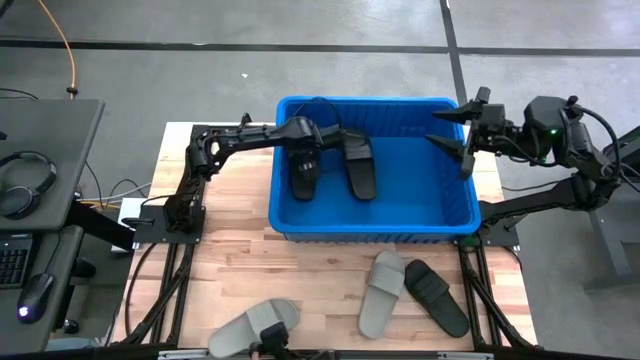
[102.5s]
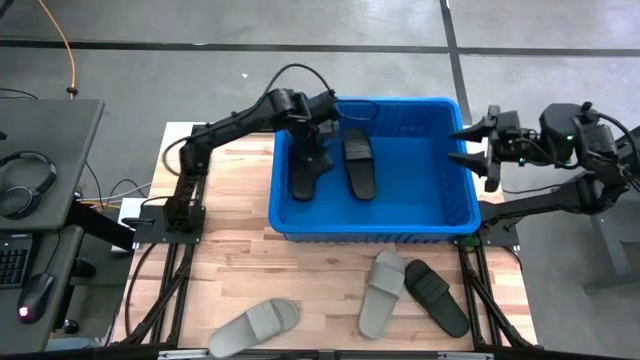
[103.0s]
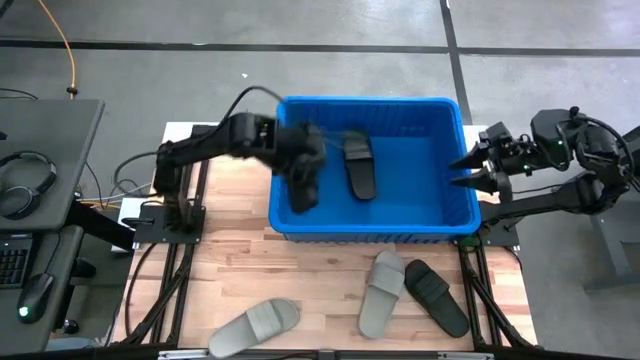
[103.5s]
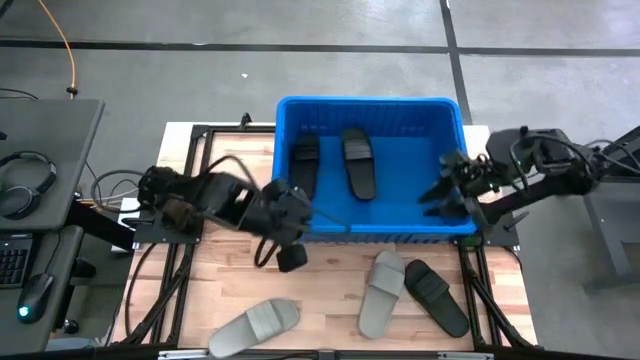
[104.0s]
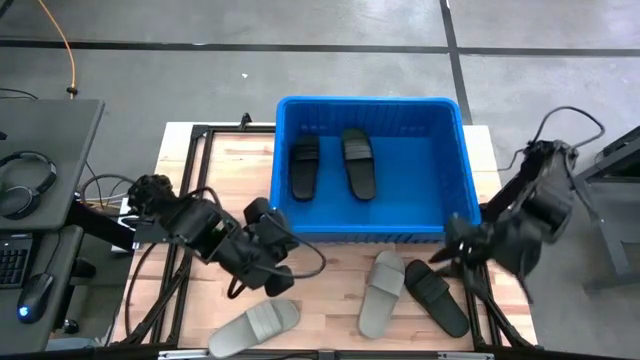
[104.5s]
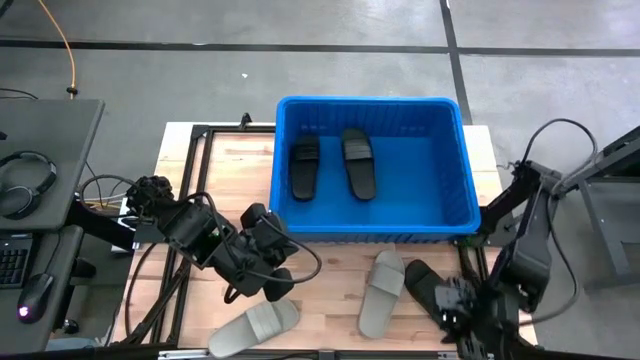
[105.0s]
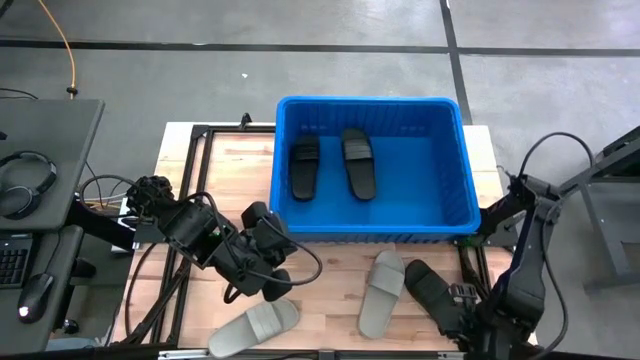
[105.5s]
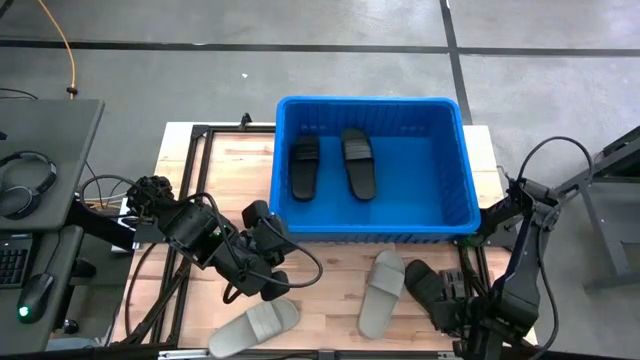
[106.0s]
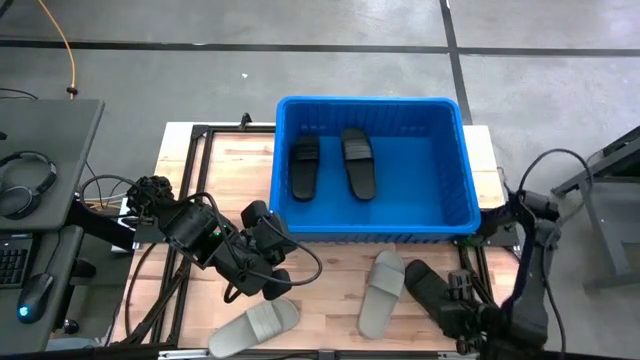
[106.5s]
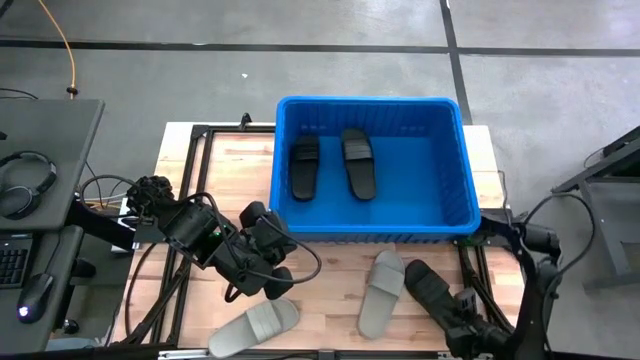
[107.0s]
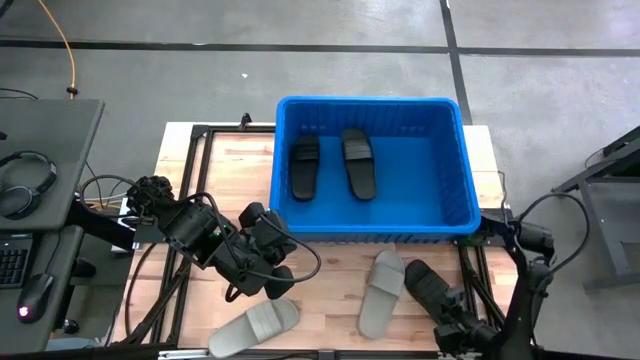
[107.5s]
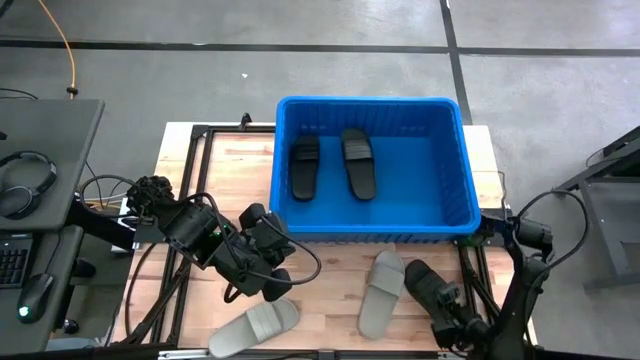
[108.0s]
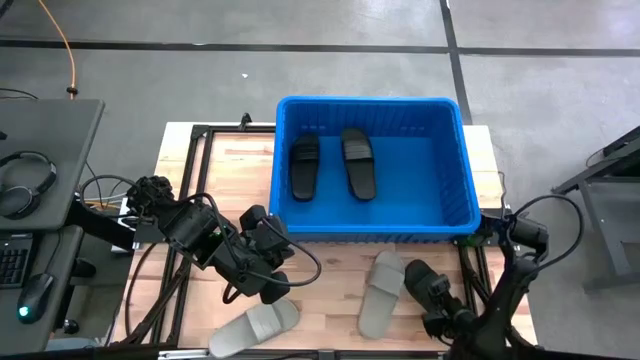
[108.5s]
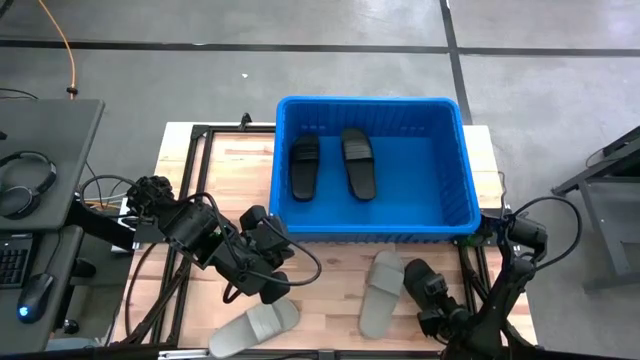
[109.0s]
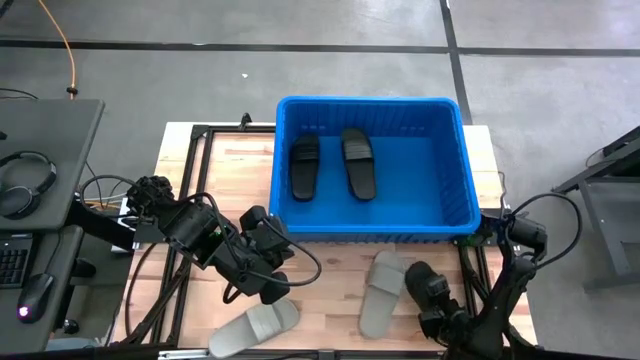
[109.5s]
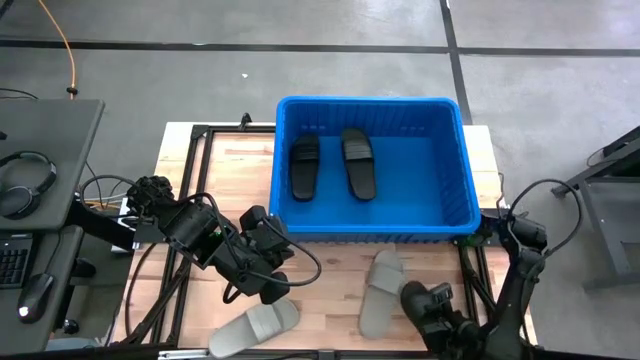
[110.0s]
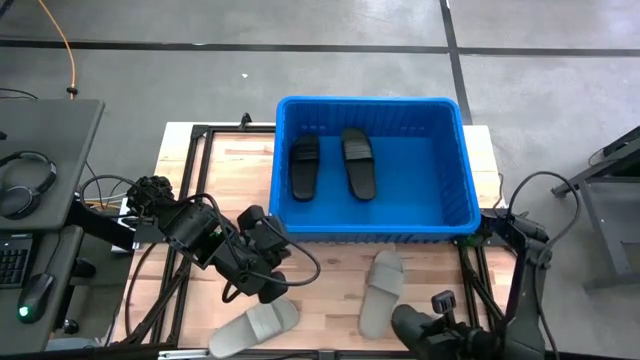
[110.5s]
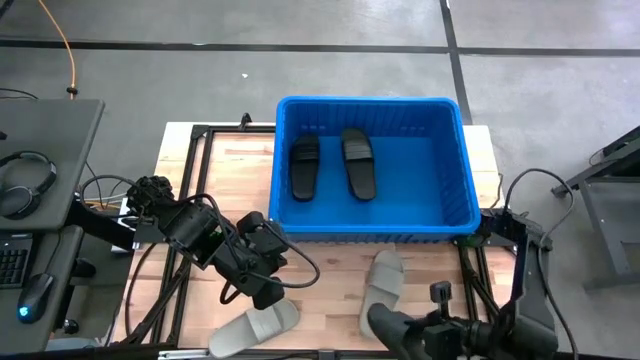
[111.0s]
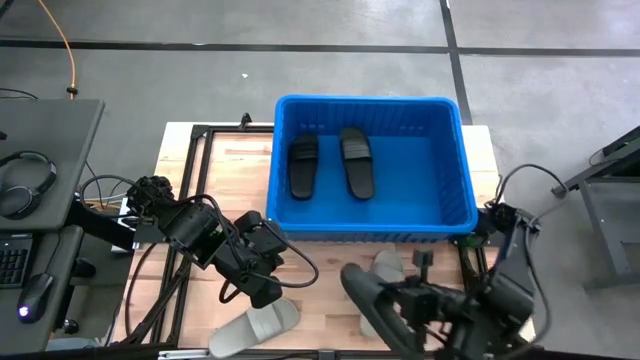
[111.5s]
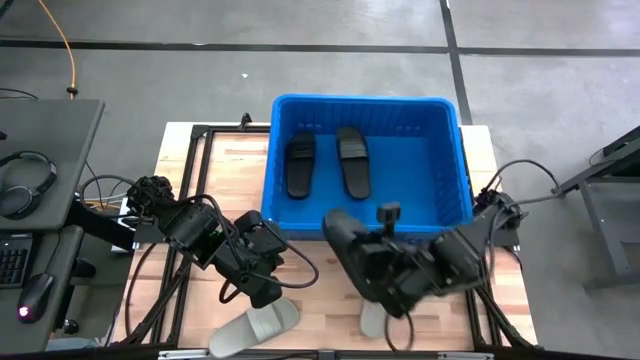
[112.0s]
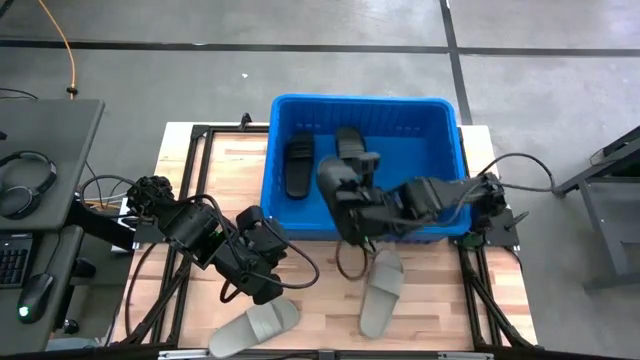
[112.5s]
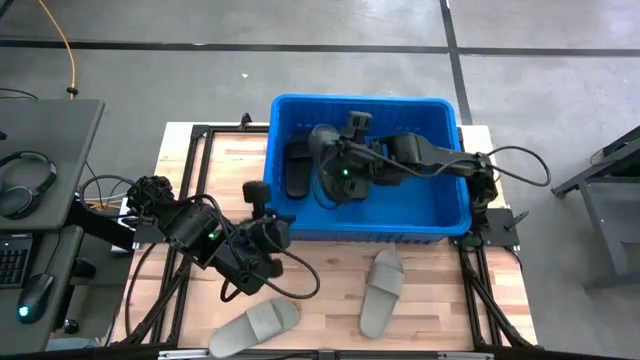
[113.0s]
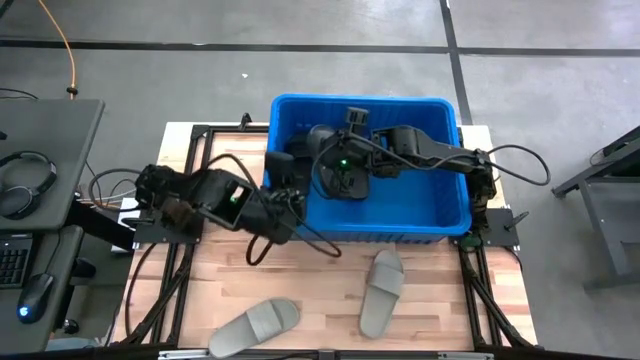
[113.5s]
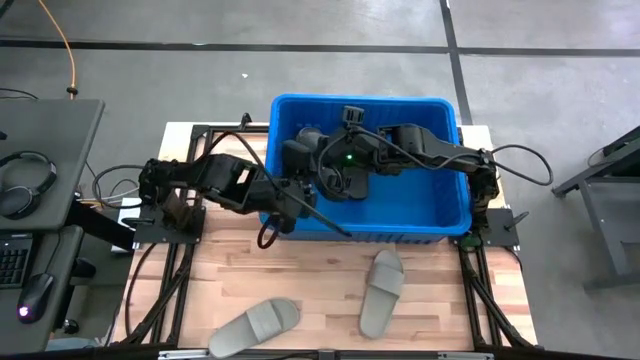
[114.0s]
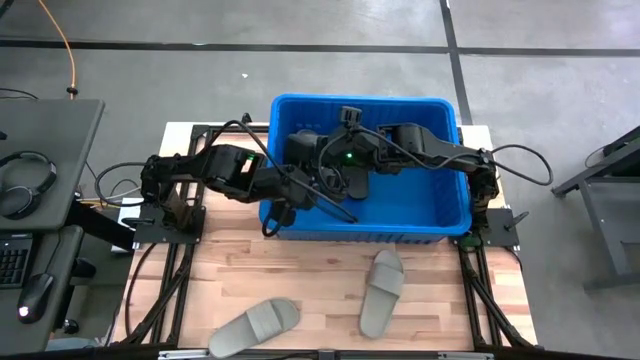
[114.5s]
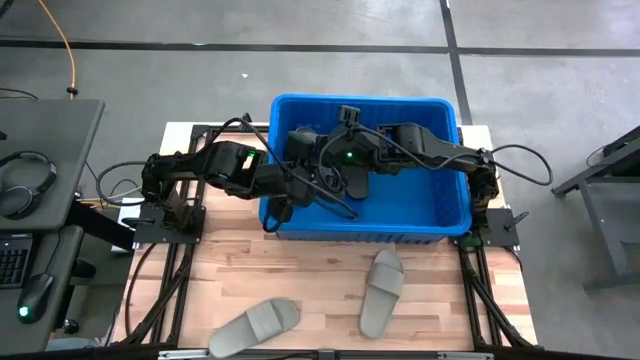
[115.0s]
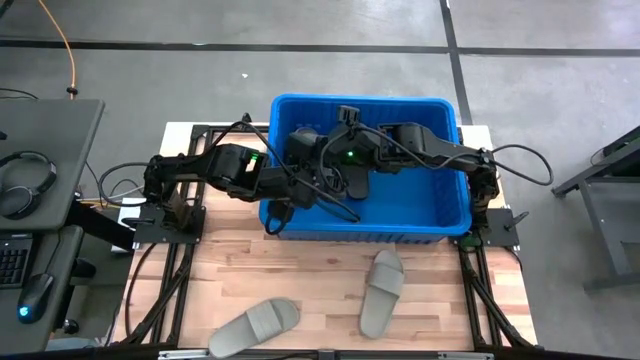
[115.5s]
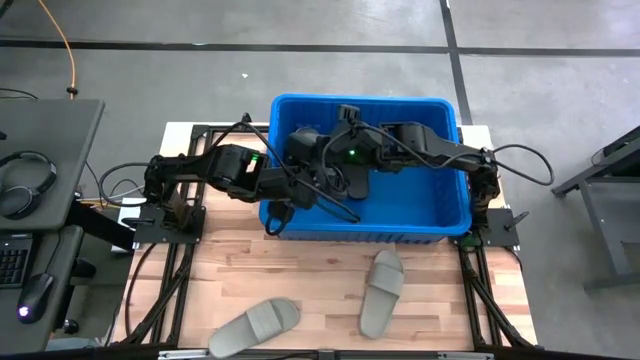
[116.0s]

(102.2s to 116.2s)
Task: Pick and place slides into bin
Put the black slides on top of the black slides into the blue bin

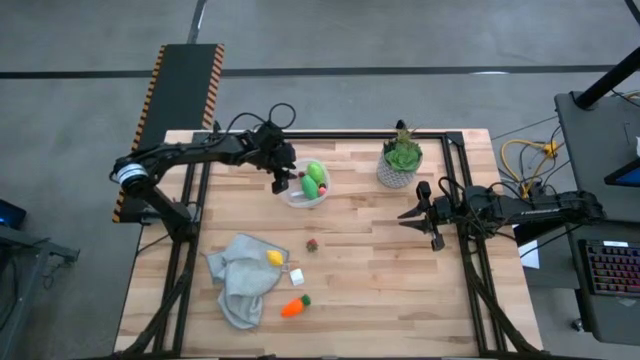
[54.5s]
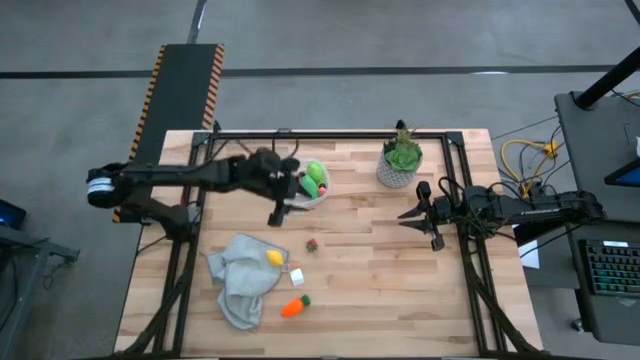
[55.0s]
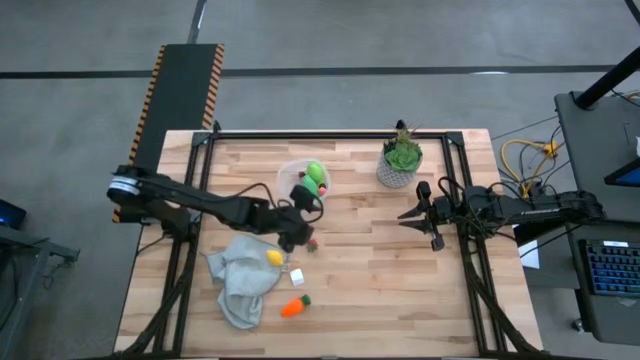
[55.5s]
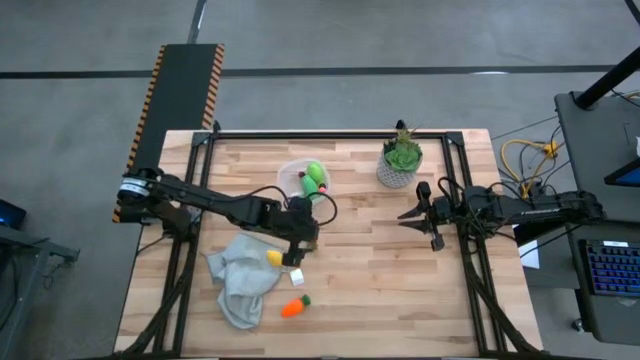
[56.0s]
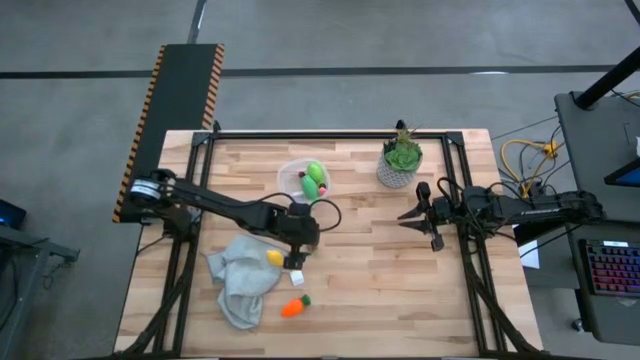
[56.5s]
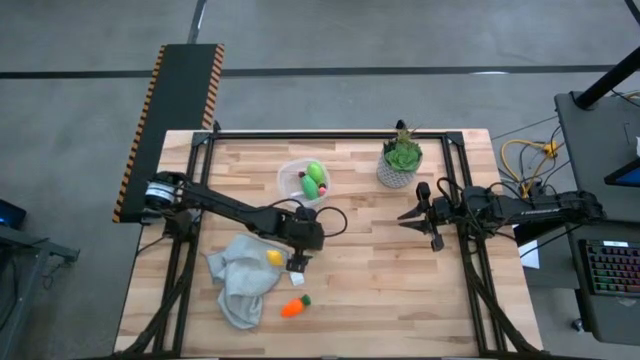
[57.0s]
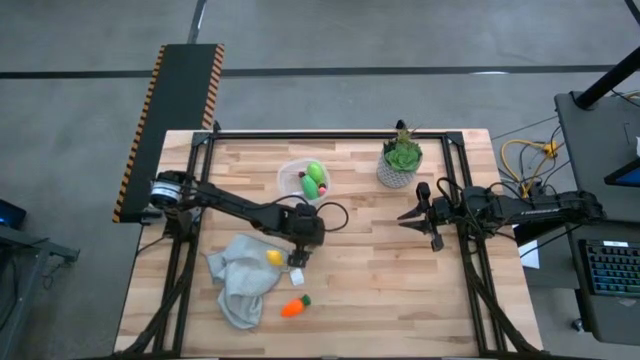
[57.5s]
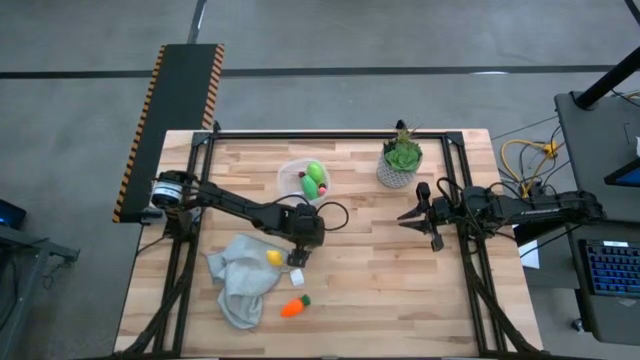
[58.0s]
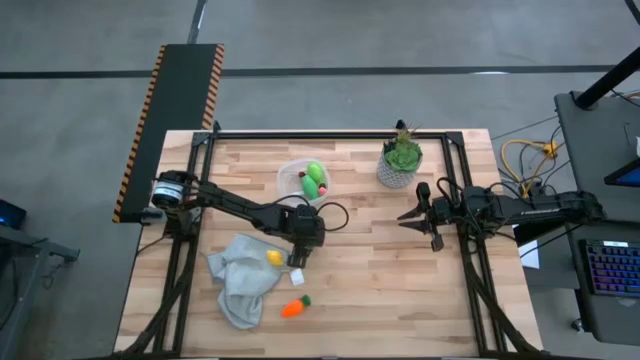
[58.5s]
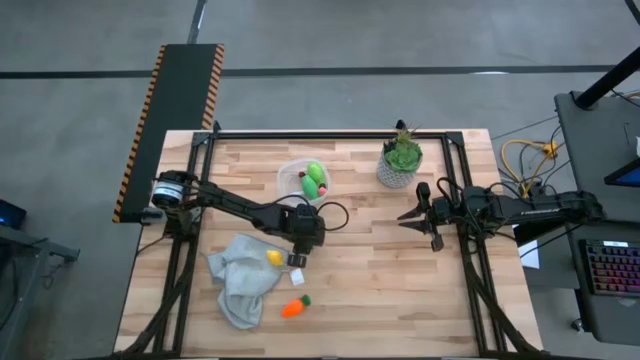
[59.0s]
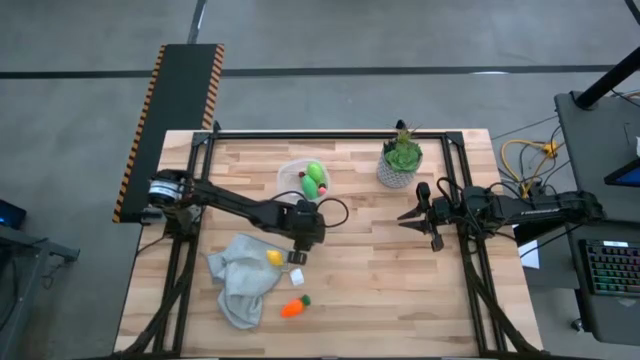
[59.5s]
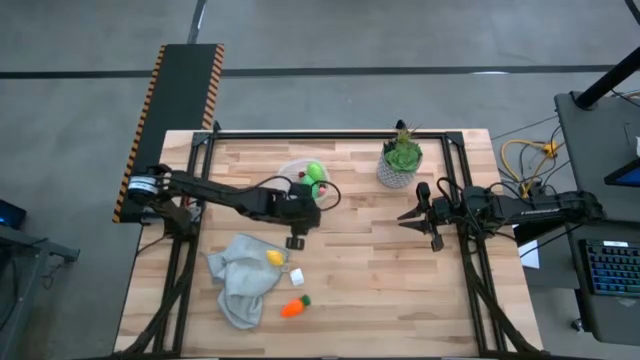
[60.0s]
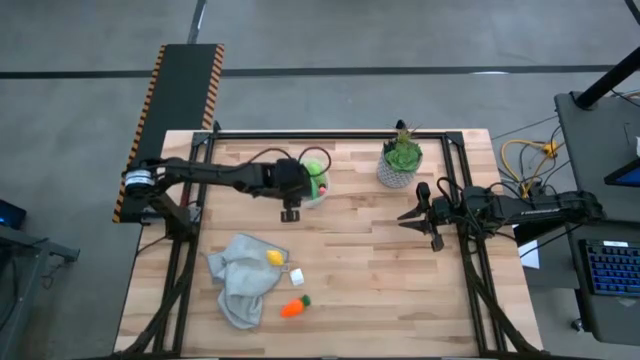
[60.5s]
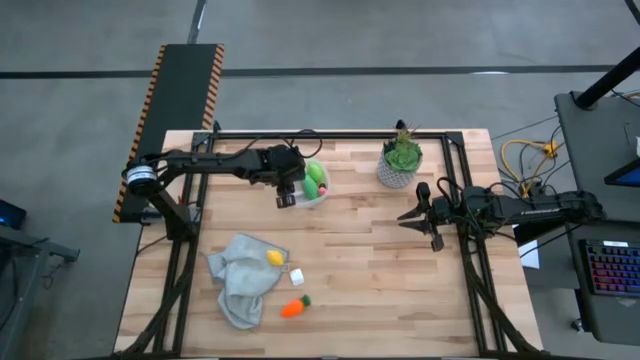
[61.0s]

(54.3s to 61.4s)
Task: Pick and placing Produce into tupperware
Put the red strawberry into the transparent bin
